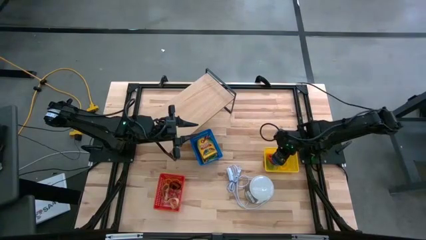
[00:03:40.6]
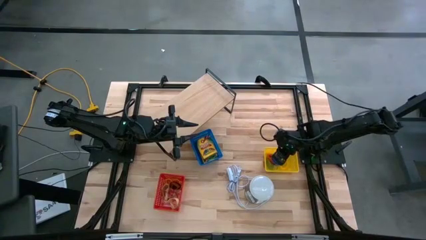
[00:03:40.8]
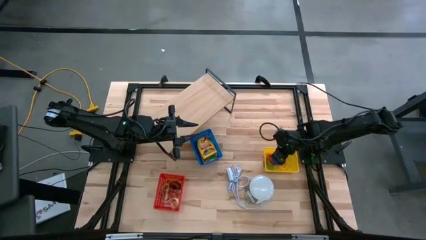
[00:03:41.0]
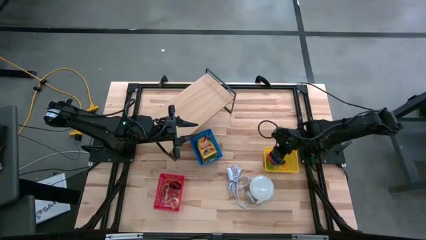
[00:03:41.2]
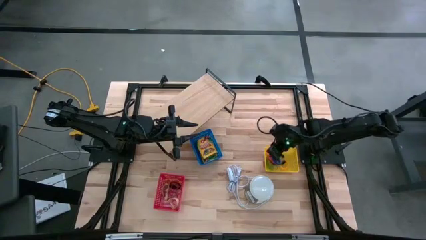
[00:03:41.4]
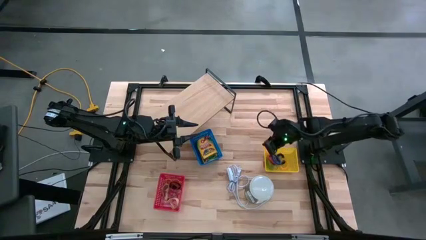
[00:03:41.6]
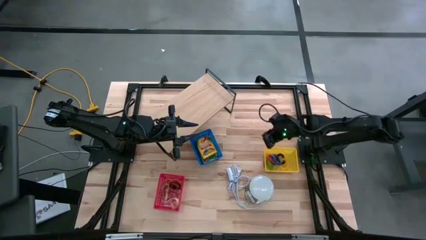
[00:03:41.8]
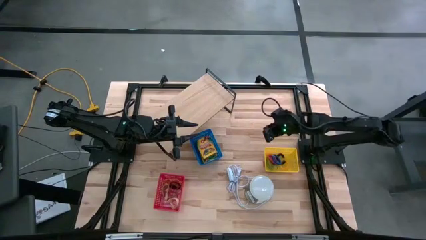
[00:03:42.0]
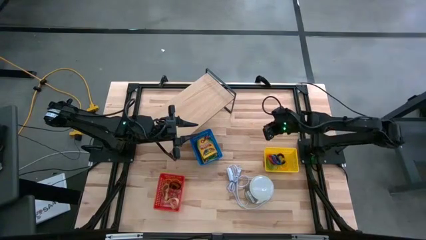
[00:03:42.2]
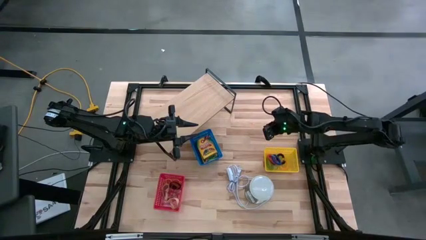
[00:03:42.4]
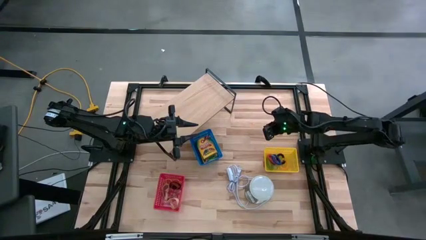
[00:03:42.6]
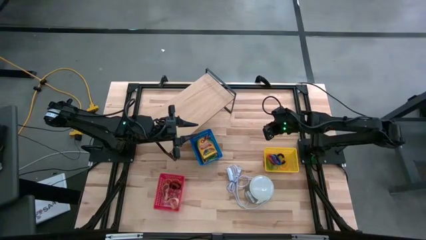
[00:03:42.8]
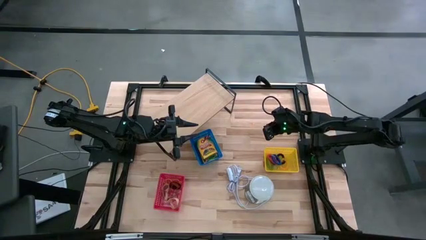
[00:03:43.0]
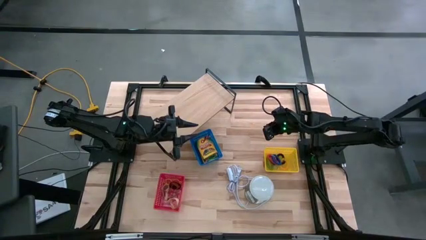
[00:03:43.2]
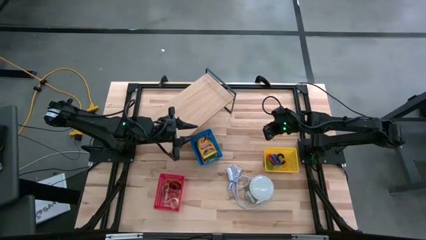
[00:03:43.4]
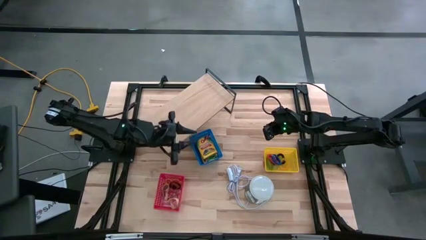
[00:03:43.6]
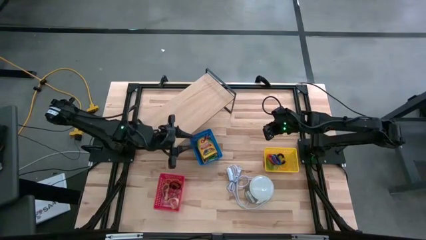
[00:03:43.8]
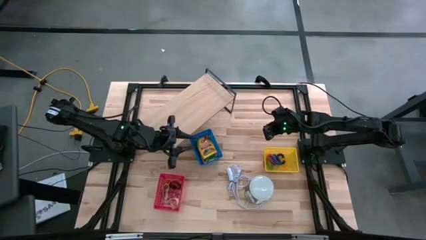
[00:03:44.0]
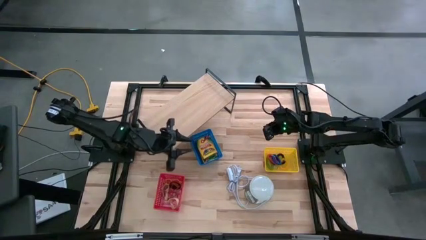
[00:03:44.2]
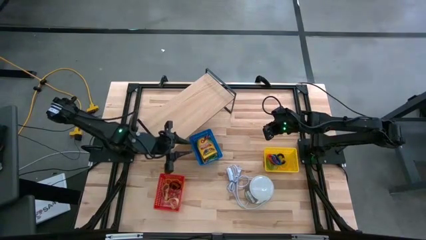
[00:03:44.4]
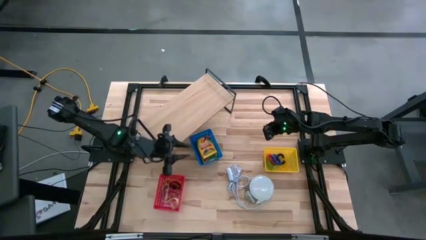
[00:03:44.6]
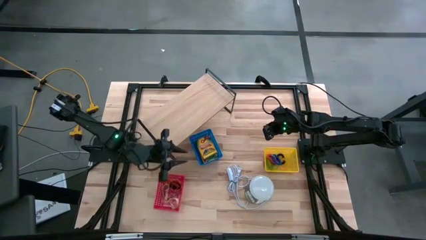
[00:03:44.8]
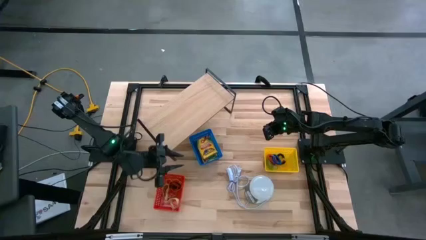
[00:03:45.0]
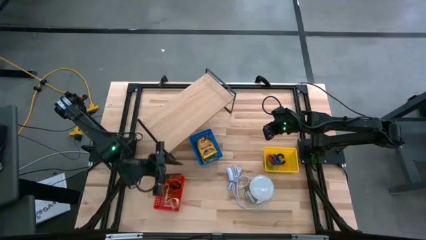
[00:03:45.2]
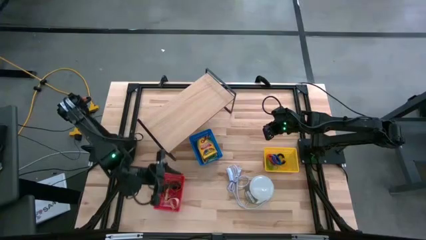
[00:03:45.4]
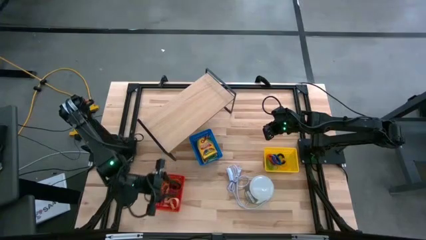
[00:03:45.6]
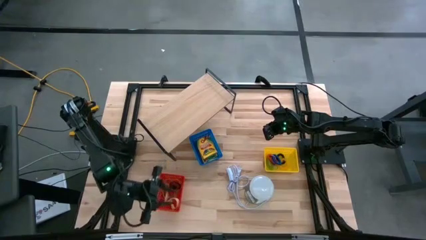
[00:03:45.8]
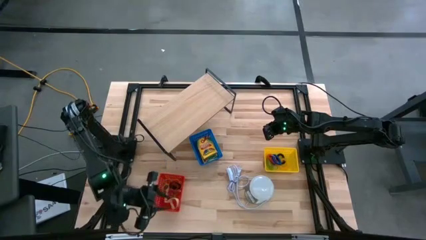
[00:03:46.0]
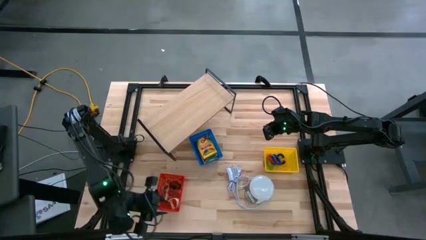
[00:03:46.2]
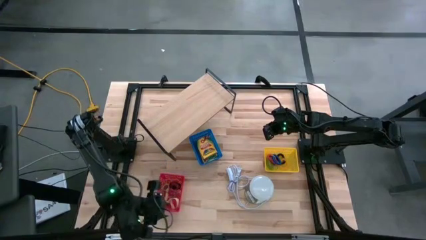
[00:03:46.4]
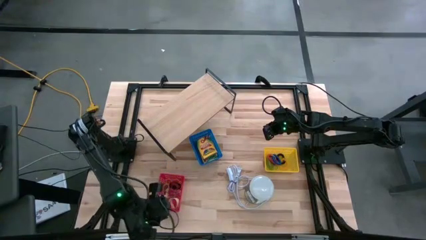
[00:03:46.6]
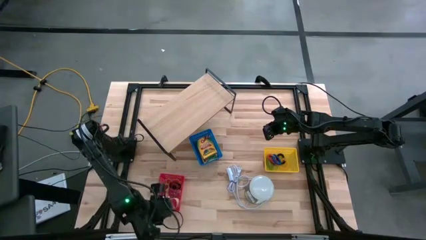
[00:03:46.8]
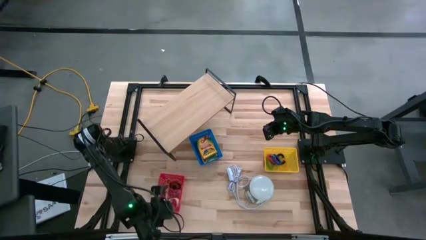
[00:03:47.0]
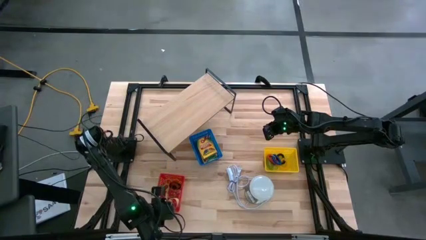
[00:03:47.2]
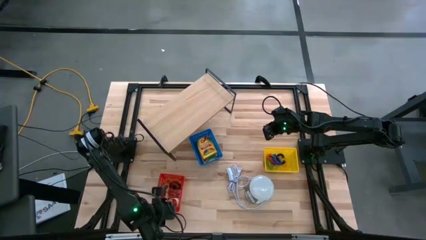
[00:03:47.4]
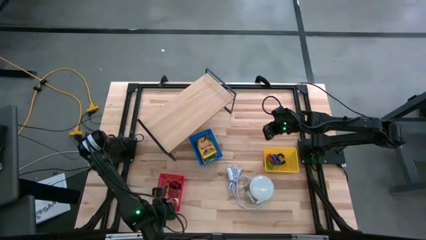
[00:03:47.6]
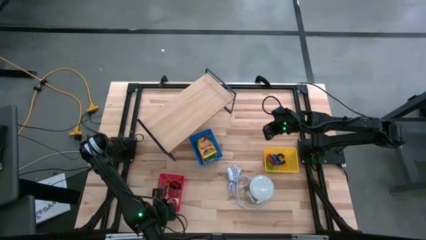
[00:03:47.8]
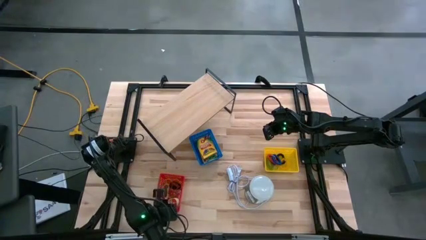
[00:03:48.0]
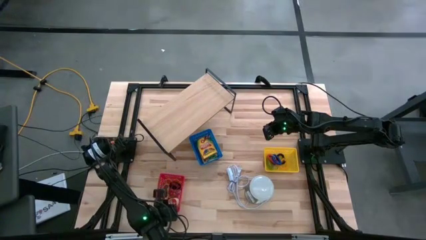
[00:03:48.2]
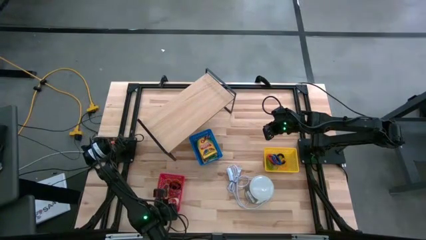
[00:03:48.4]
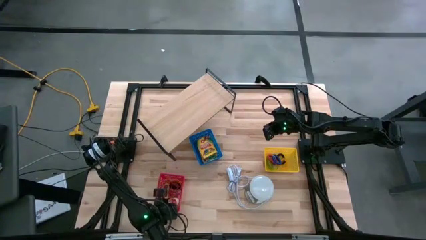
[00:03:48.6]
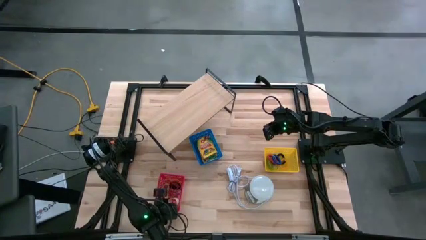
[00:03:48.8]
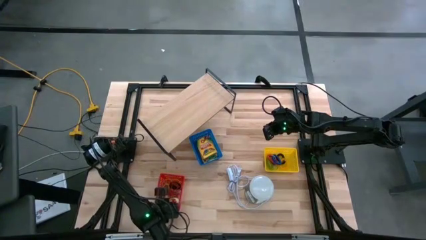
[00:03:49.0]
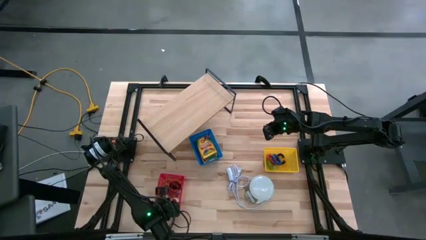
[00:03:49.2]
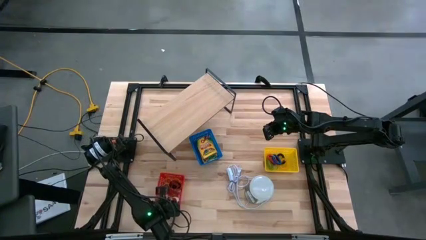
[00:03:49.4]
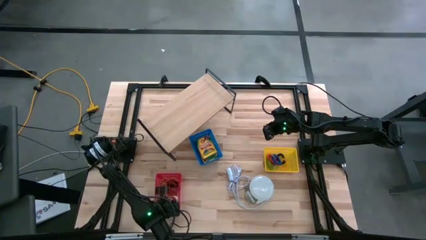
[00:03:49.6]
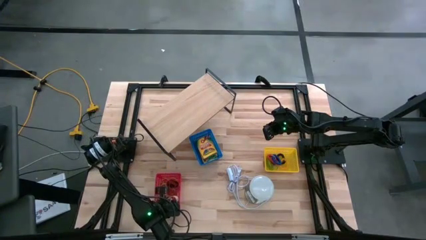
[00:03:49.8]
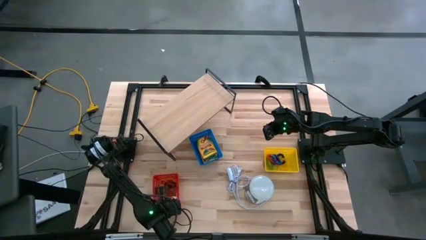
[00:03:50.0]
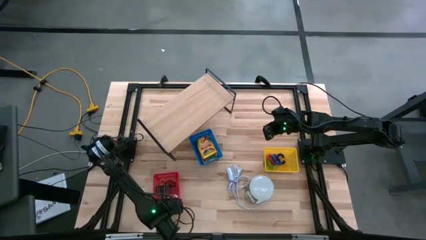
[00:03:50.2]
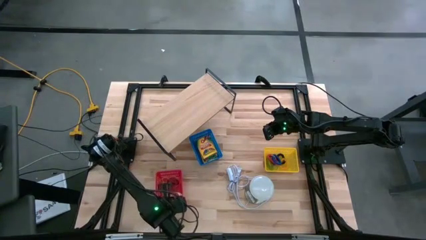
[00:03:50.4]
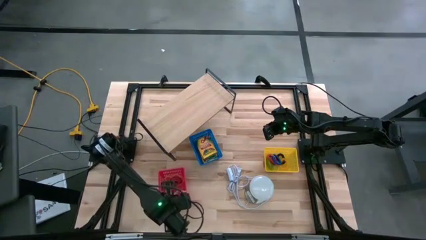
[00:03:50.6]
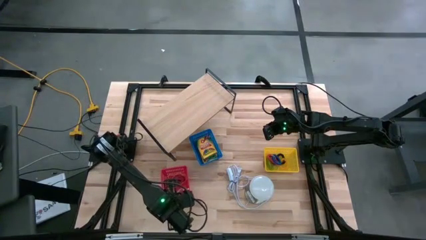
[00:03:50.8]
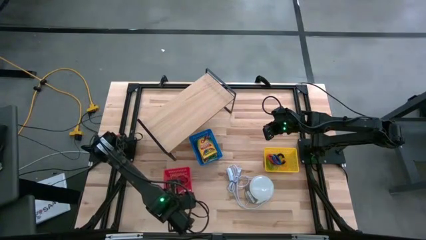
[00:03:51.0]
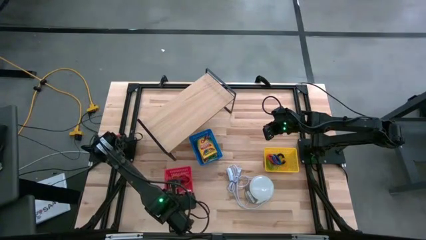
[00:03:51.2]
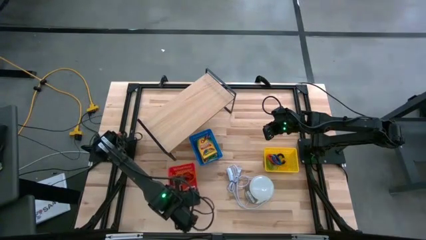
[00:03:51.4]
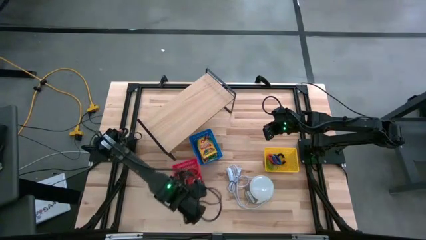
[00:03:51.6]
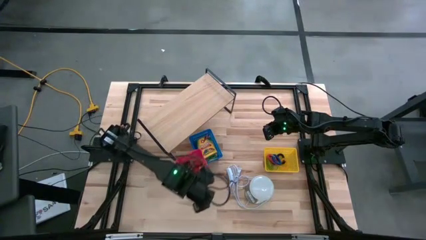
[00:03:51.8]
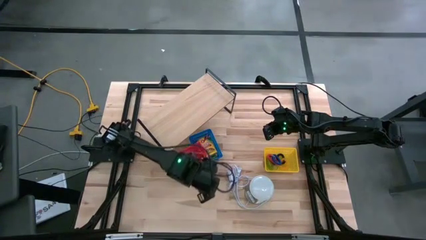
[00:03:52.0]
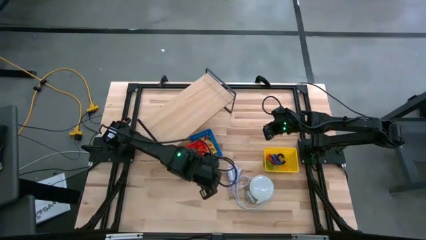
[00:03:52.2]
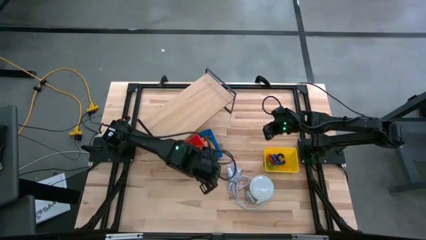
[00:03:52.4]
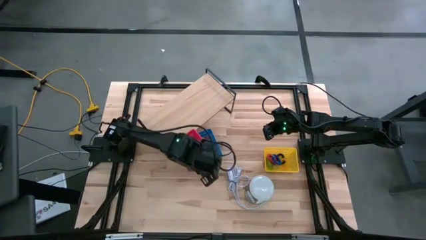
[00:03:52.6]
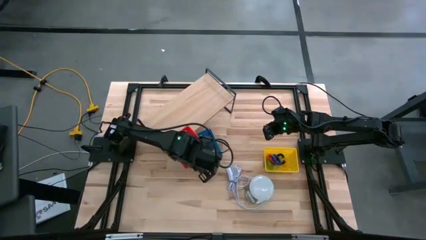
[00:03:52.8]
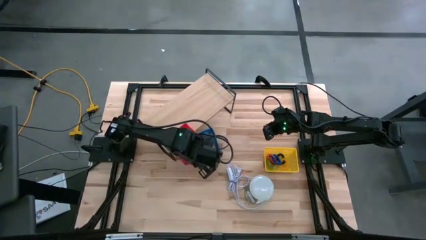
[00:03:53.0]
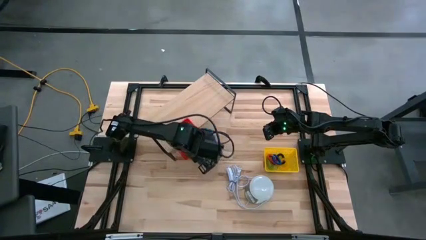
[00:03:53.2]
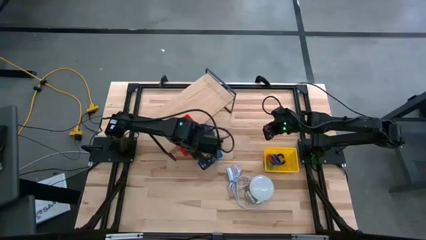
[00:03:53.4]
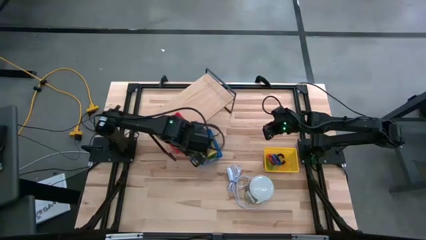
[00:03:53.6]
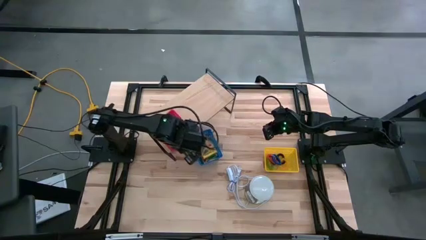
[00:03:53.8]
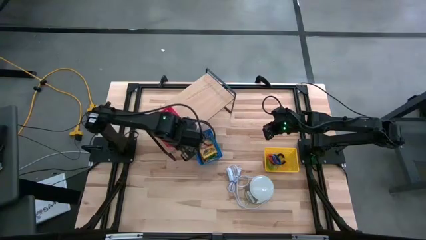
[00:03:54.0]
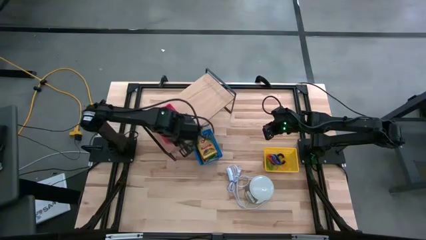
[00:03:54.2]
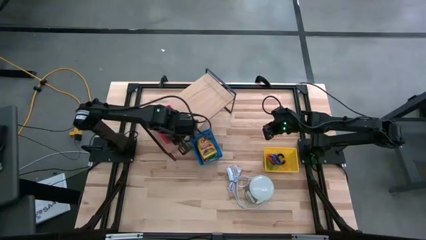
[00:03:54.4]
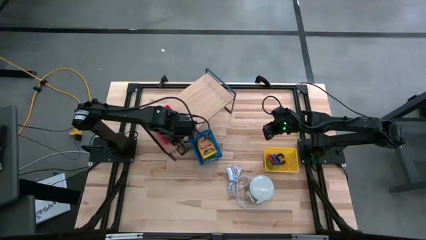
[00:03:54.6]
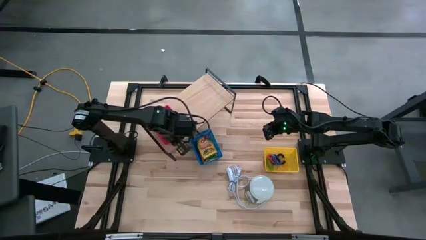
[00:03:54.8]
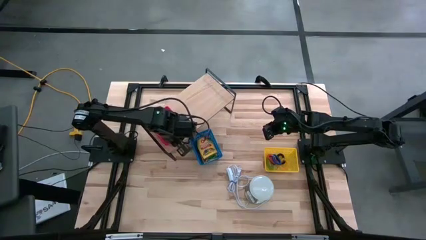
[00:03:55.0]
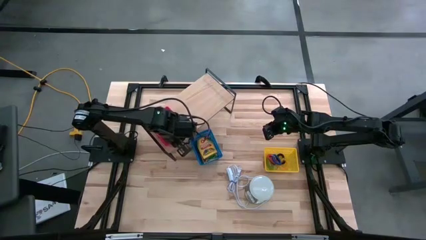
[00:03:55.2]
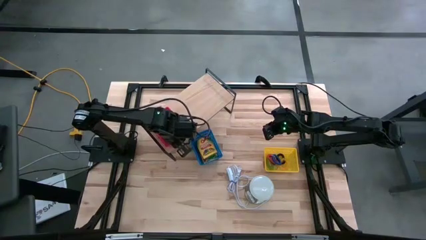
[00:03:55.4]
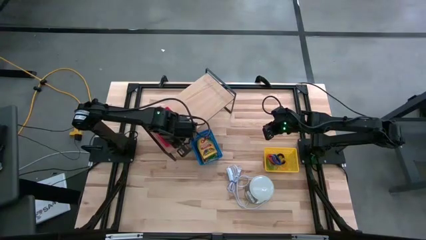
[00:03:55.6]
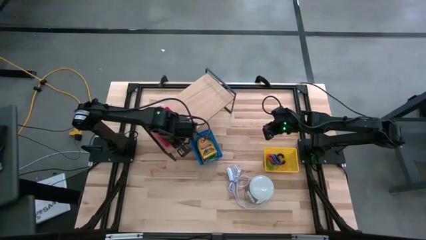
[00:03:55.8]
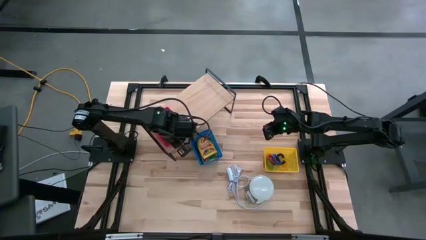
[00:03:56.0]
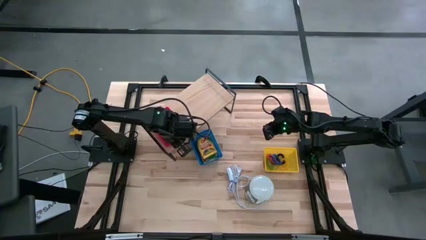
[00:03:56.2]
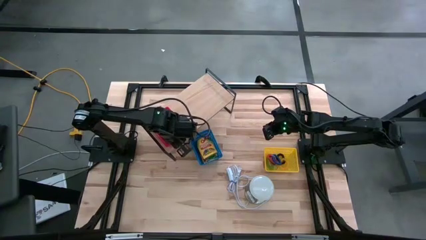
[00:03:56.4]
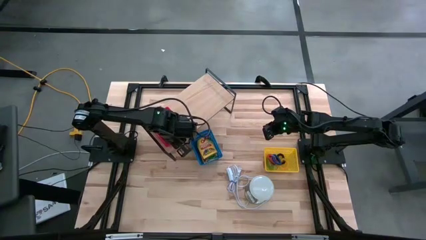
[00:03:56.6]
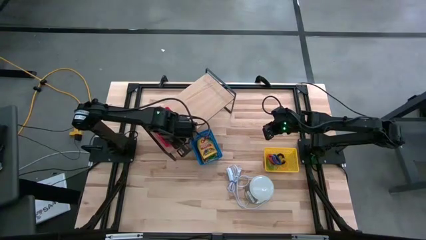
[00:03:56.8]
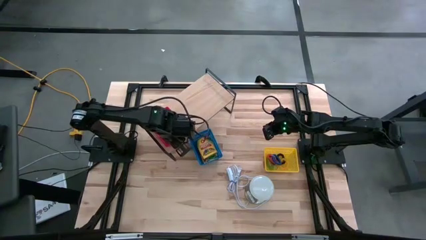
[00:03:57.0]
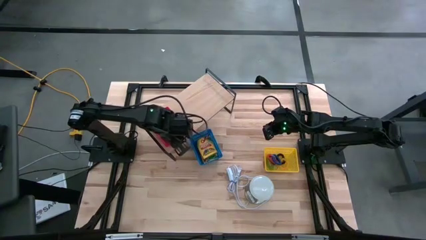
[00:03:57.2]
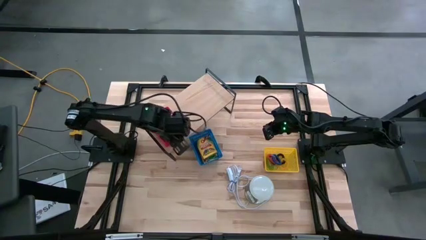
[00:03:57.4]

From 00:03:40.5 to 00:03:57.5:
Task: Pick & Place Office Desk Supplies
Put the red bin with sorted rubber bands on the shelf
